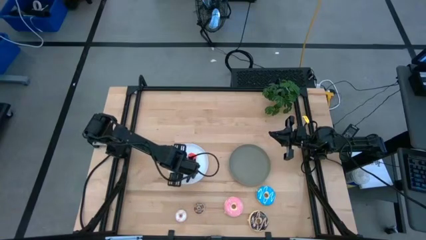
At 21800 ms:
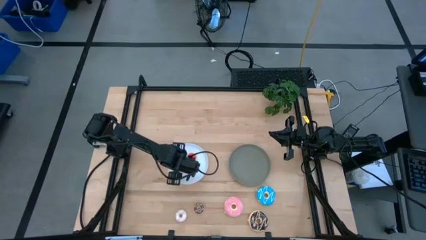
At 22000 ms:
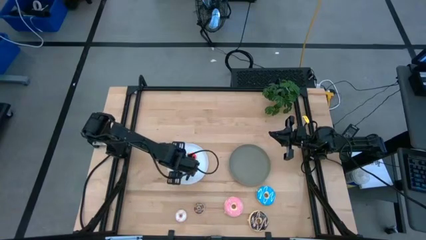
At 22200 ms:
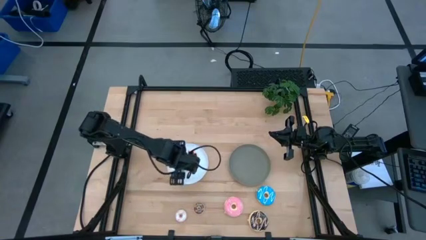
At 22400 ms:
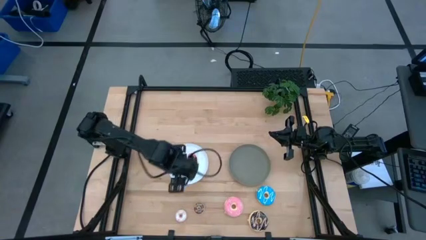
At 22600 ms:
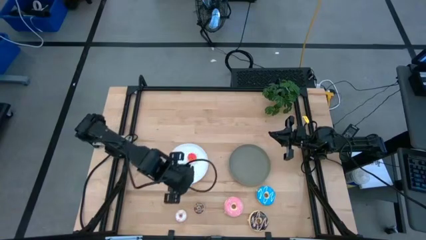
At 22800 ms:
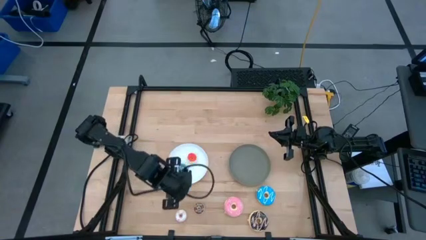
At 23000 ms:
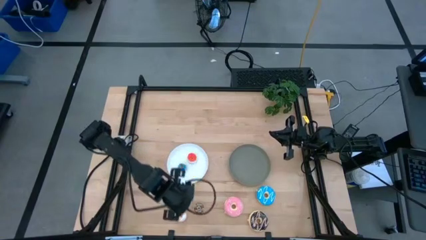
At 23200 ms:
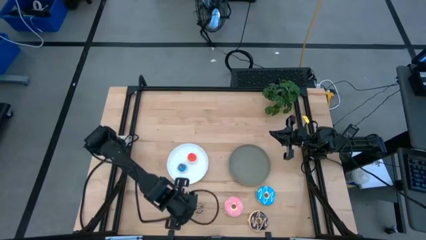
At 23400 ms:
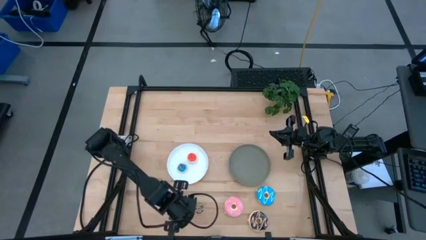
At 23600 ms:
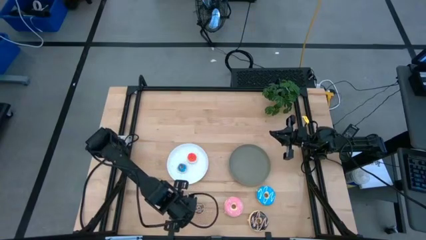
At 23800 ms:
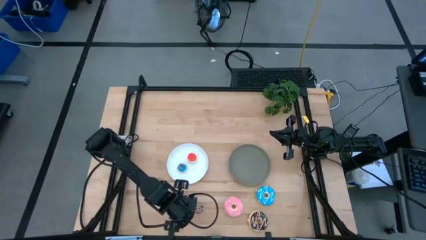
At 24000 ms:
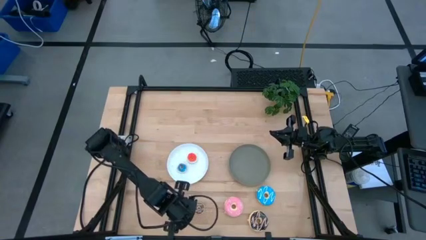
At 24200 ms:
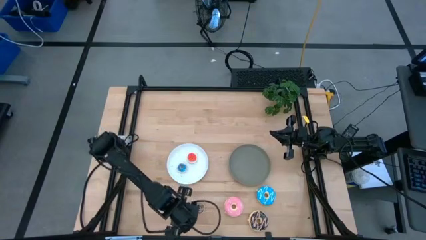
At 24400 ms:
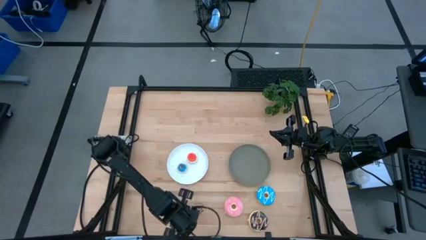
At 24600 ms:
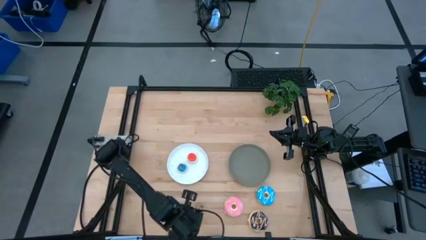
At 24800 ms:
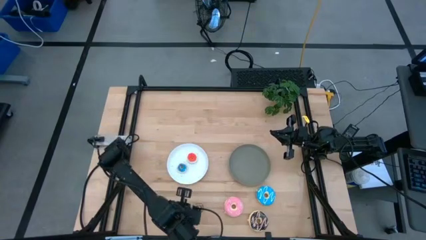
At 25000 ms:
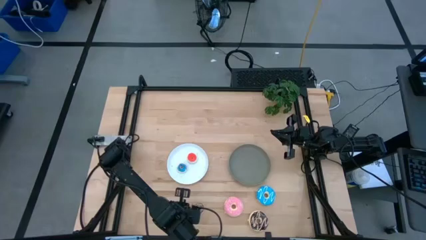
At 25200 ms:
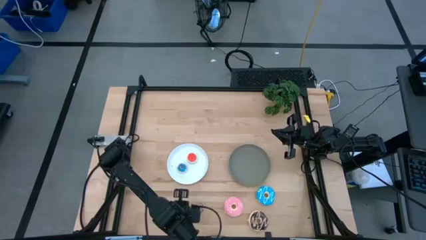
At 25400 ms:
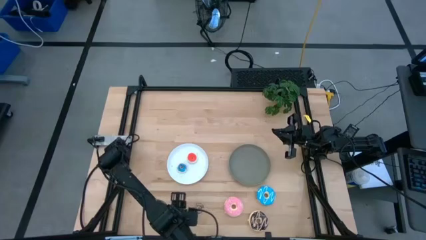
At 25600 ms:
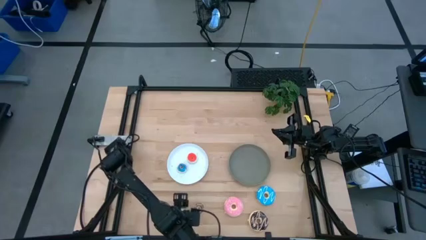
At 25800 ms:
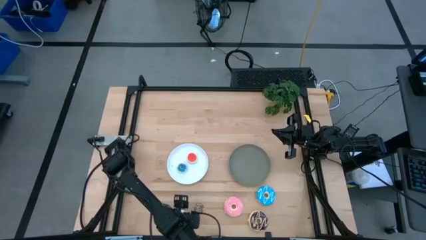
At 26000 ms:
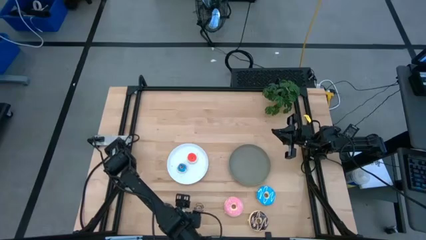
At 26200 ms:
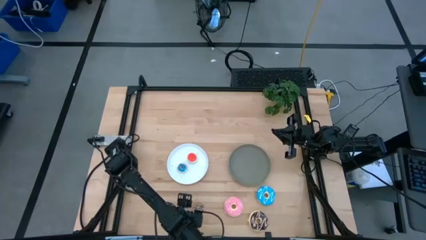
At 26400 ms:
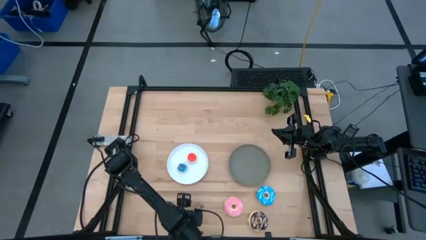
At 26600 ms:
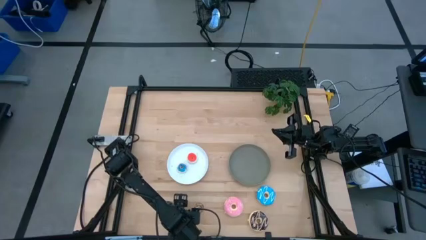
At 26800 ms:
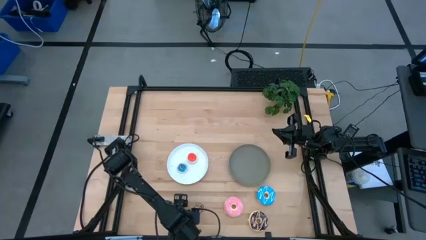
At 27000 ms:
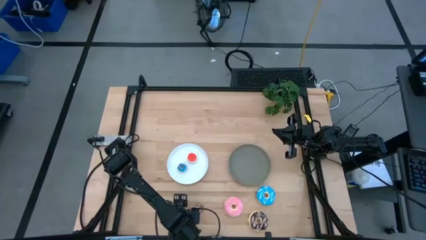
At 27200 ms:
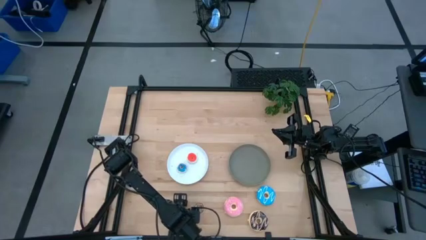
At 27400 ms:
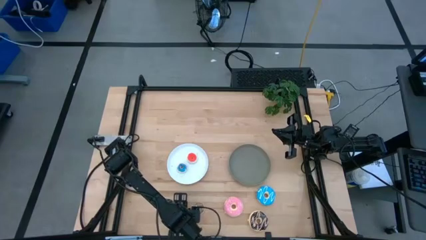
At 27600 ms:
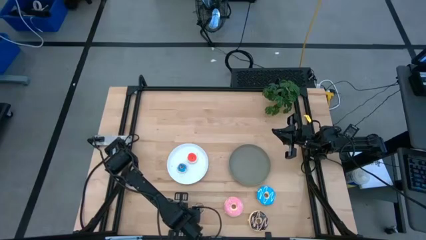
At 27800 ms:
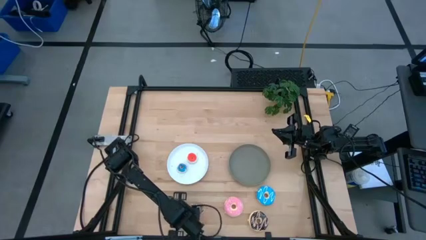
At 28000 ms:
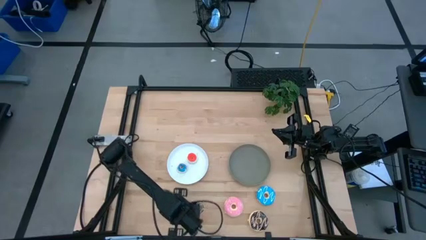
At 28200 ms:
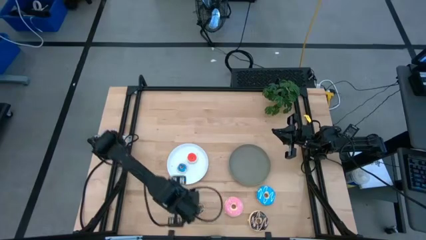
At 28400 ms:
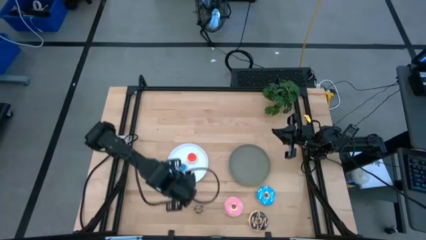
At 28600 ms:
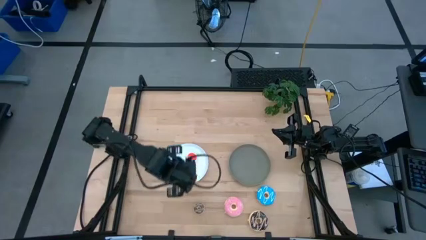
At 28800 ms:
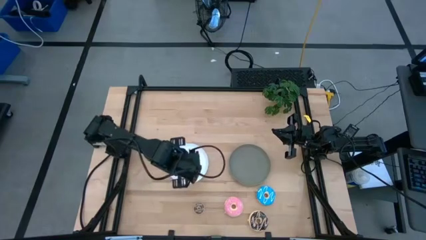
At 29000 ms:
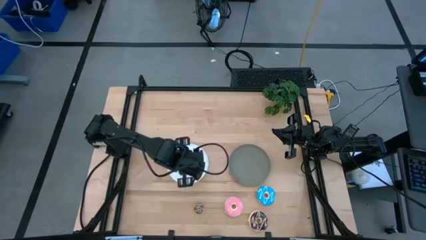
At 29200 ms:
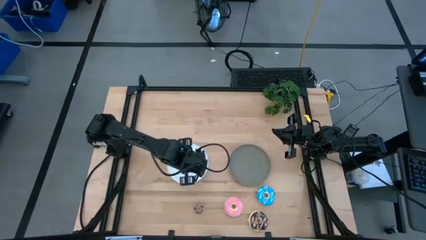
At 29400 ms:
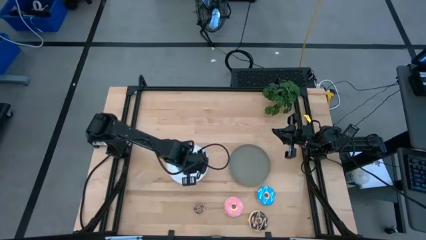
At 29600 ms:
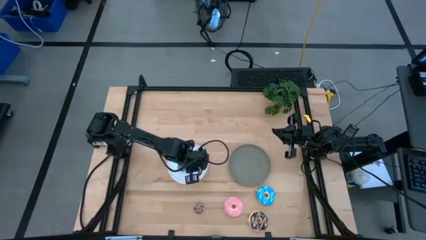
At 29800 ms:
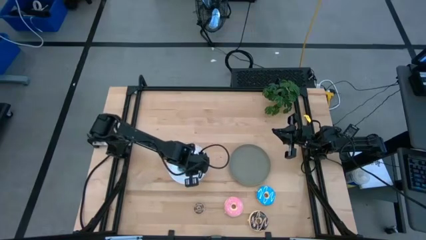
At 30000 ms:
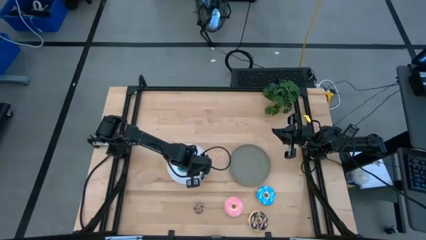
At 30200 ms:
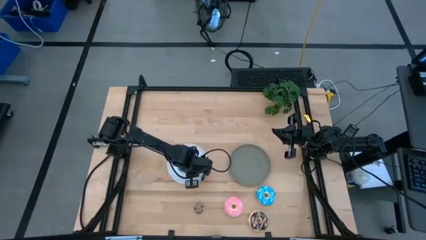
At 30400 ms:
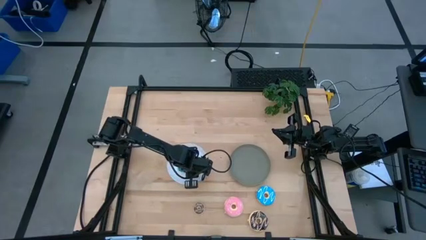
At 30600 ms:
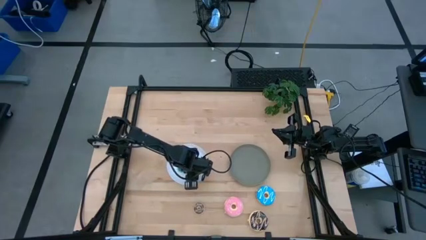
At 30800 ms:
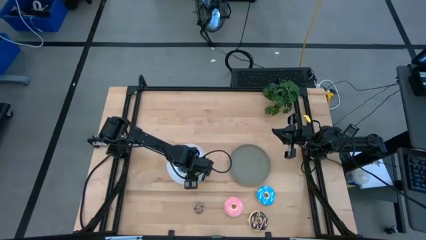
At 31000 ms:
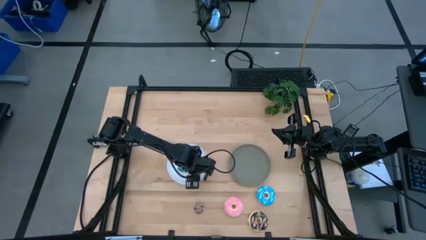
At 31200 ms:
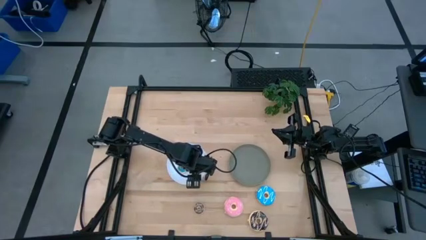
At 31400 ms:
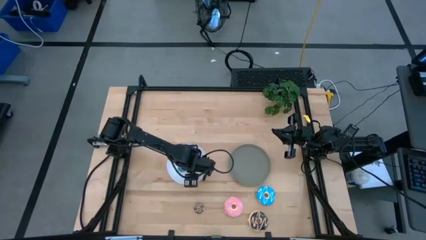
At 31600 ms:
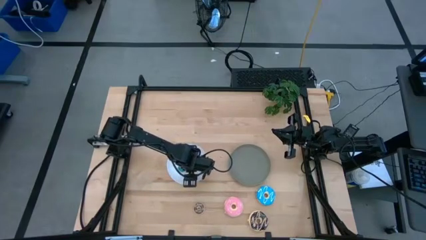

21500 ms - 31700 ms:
Task: Pick & Place donuts
Put the small white donut on the white plate

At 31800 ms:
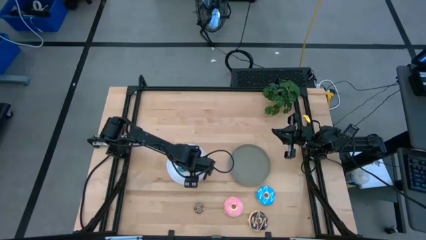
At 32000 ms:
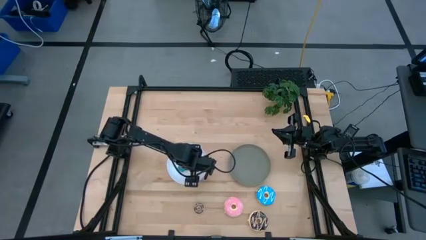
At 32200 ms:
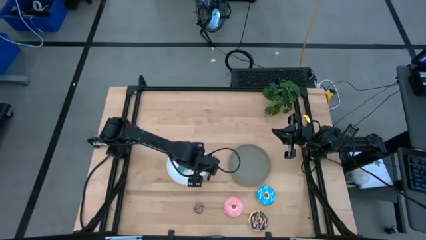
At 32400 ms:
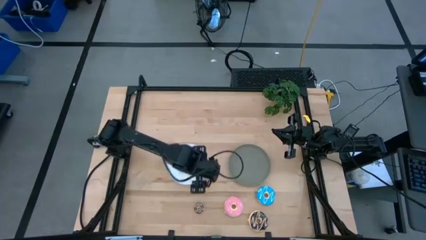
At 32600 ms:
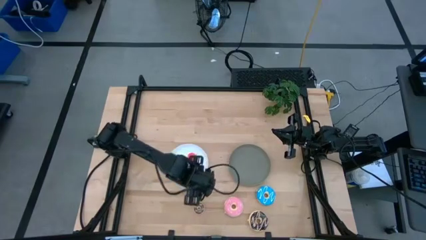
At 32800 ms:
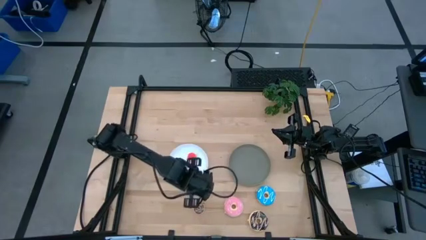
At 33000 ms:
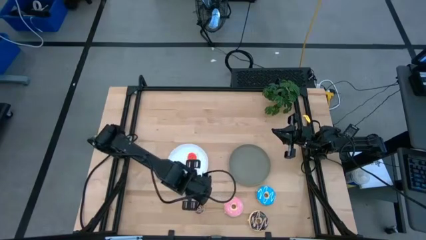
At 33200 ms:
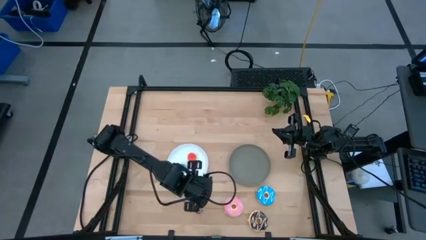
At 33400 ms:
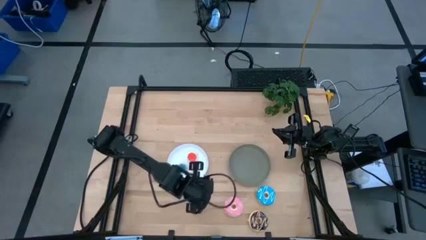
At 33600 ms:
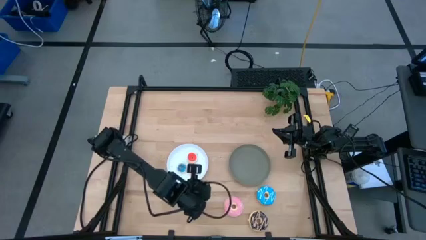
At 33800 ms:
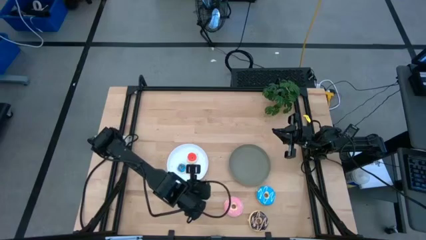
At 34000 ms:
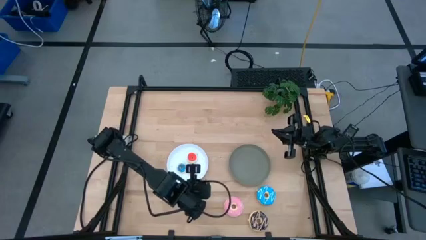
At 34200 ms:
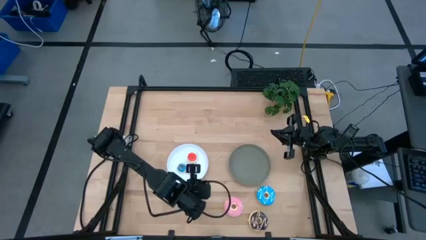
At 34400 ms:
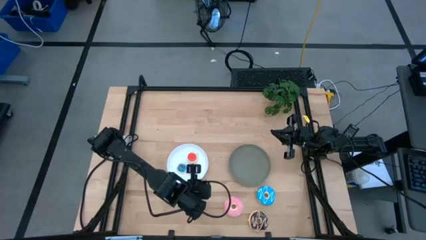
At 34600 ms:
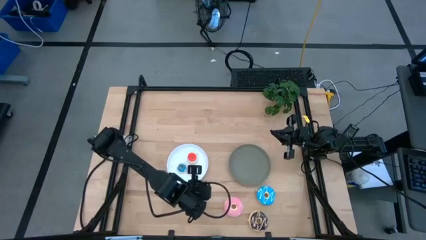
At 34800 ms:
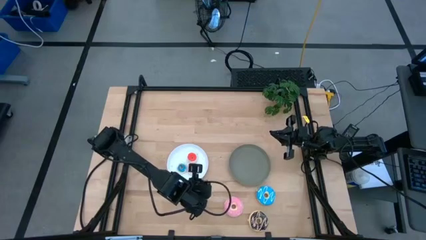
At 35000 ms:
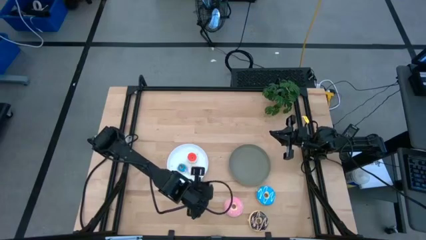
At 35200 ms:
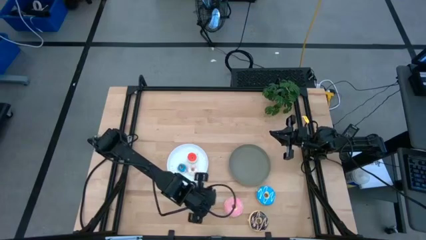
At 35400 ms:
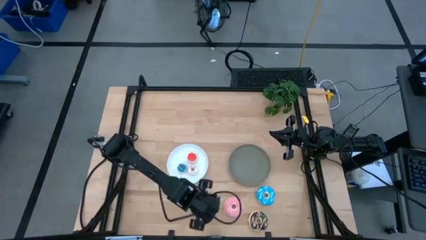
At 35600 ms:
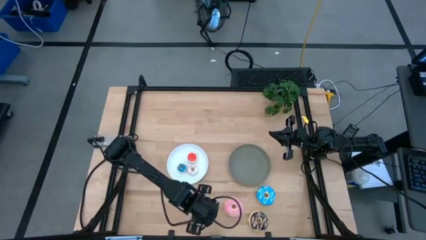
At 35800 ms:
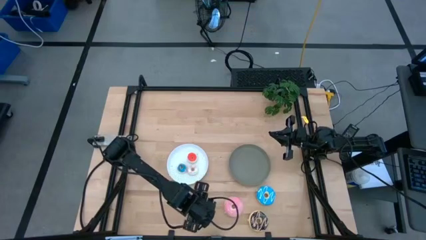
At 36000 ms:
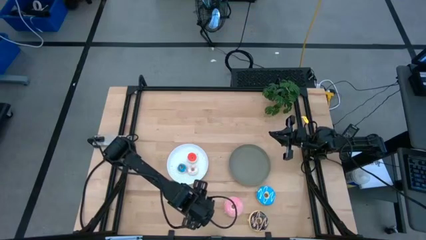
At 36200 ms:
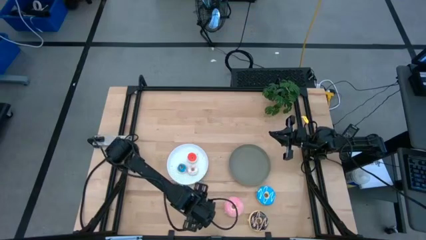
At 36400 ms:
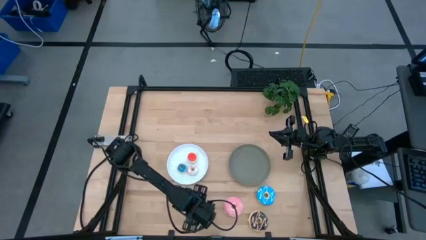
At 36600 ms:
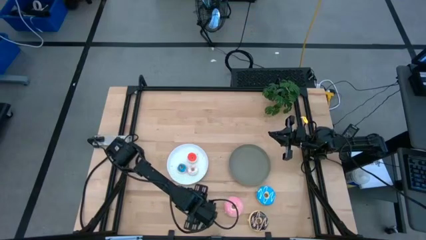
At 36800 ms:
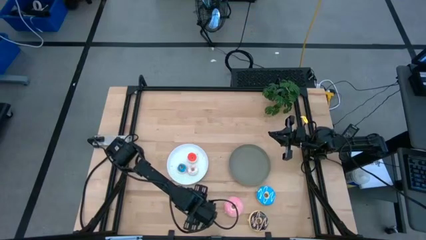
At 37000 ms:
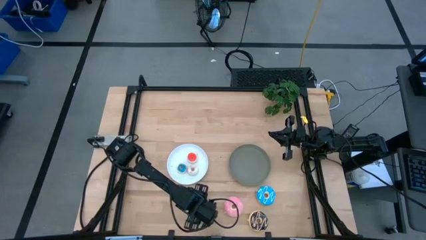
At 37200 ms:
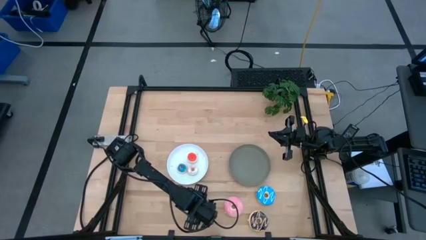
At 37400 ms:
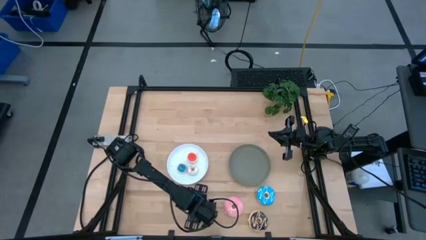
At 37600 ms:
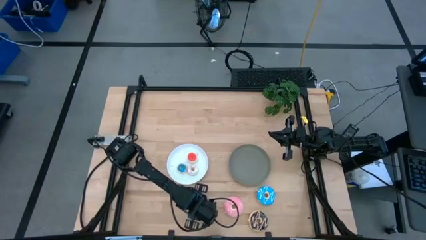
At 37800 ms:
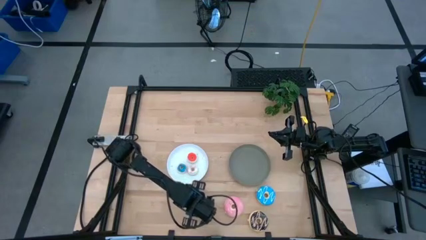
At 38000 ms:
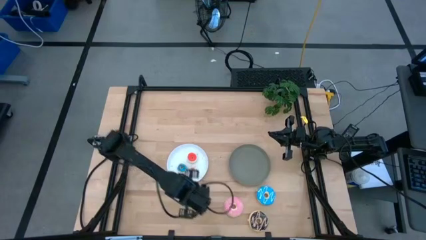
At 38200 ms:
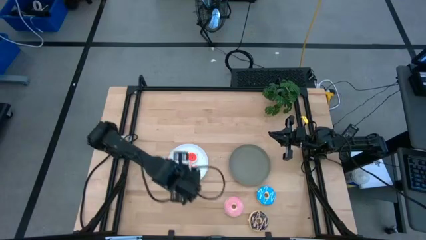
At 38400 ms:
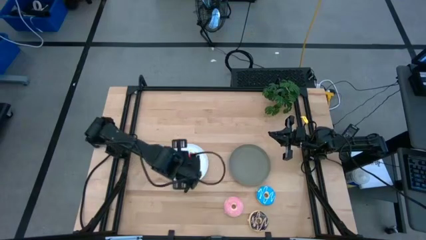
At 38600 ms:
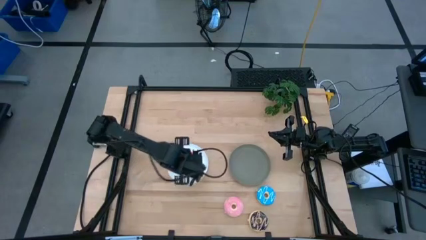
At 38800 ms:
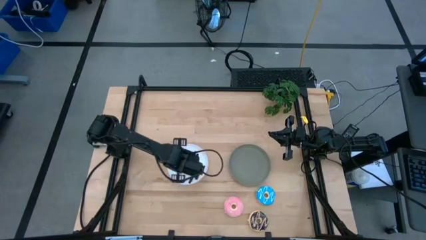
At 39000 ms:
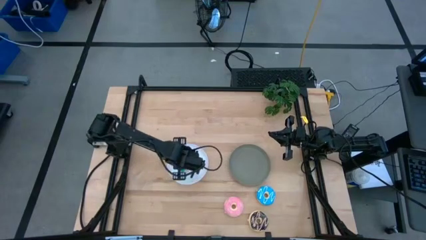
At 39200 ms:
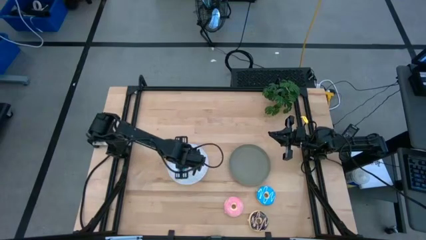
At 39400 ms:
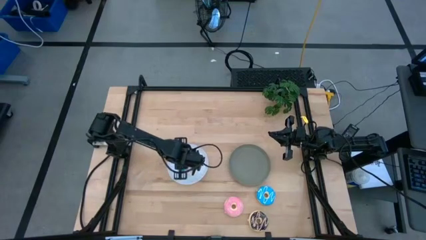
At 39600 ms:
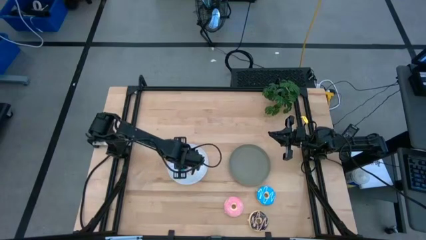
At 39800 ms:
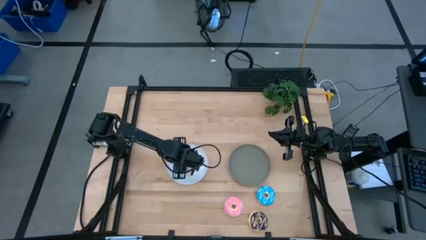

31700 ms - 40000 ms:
Put the small brown donut on the white plate
